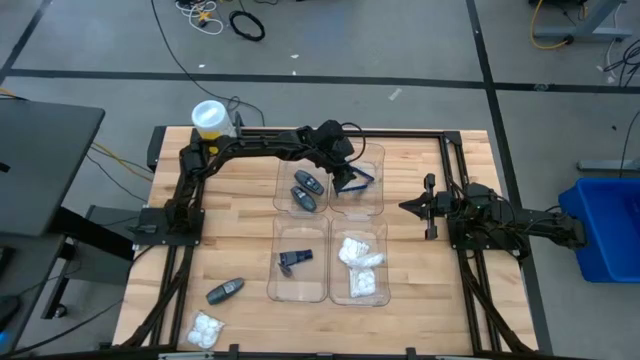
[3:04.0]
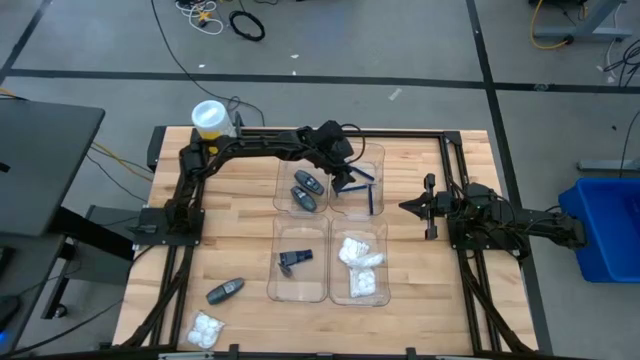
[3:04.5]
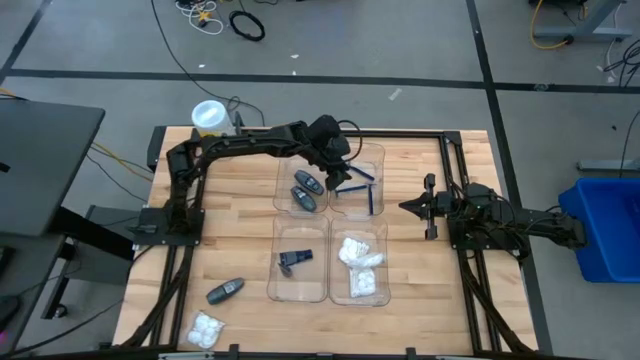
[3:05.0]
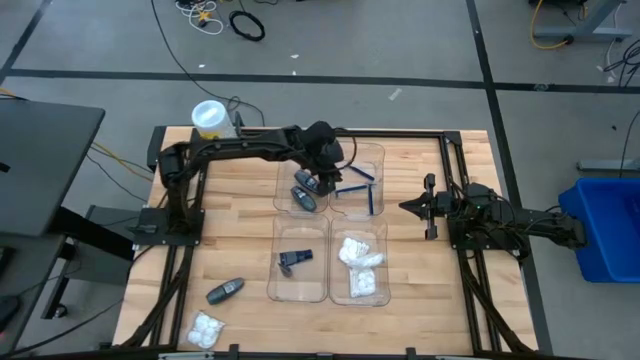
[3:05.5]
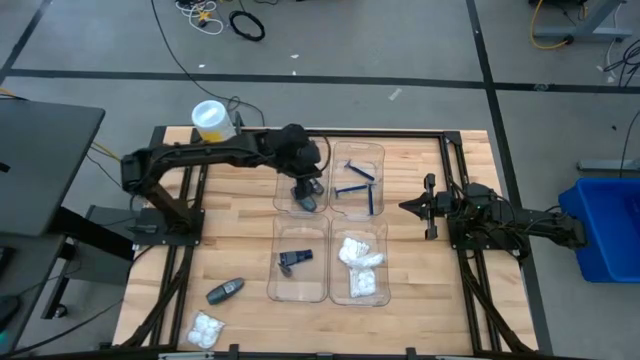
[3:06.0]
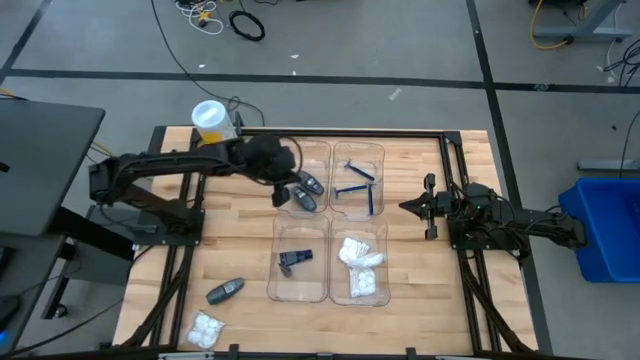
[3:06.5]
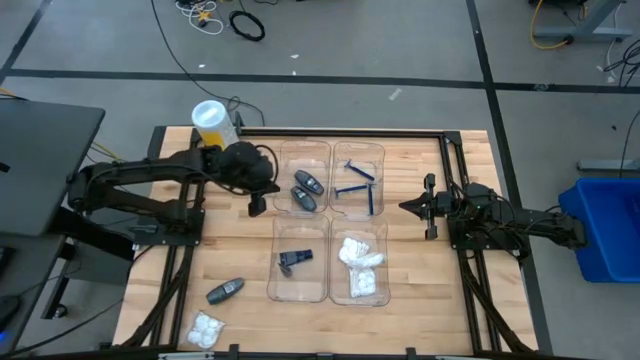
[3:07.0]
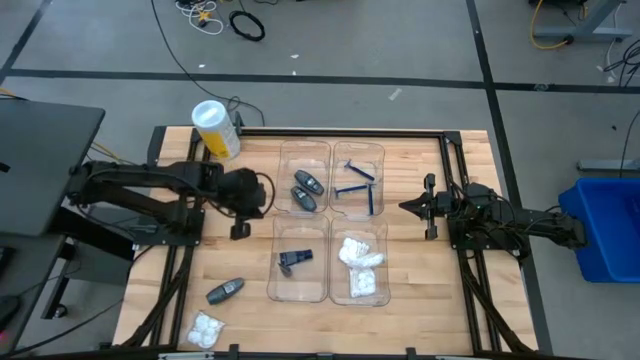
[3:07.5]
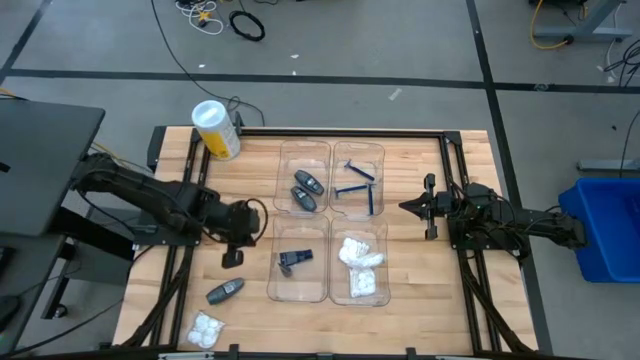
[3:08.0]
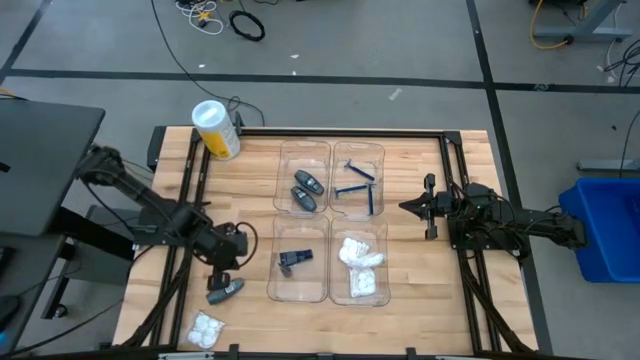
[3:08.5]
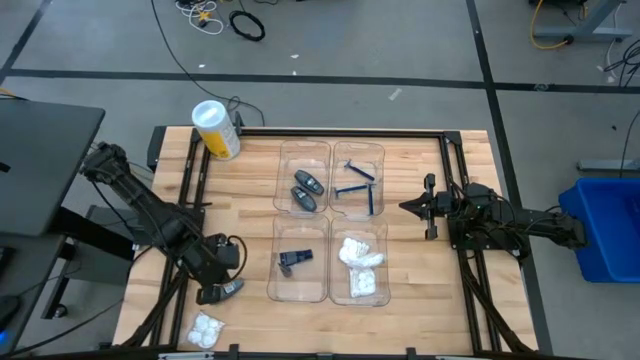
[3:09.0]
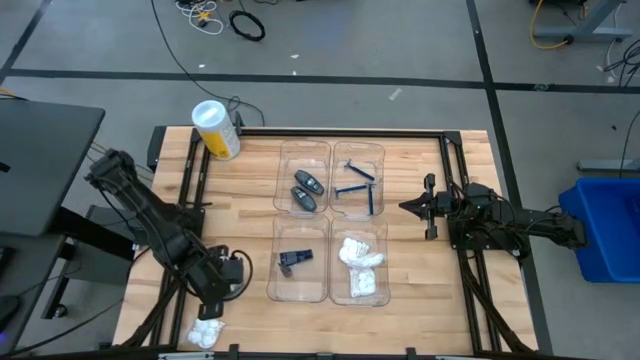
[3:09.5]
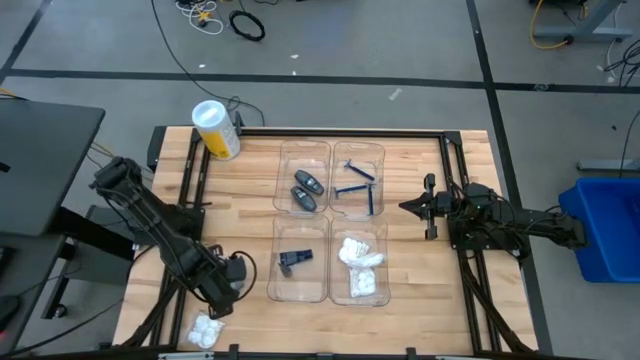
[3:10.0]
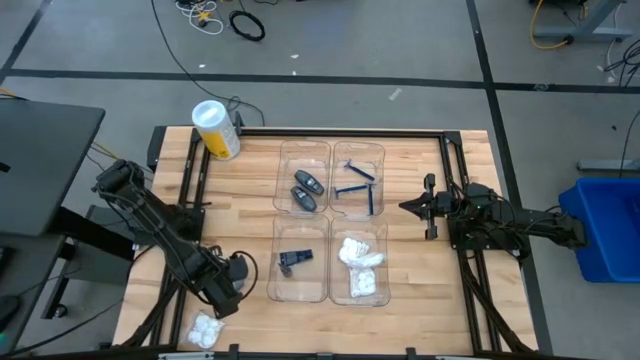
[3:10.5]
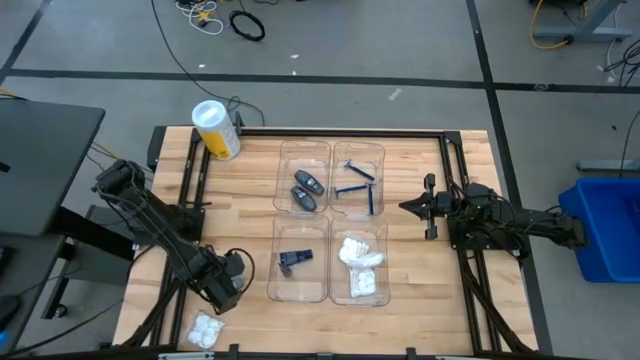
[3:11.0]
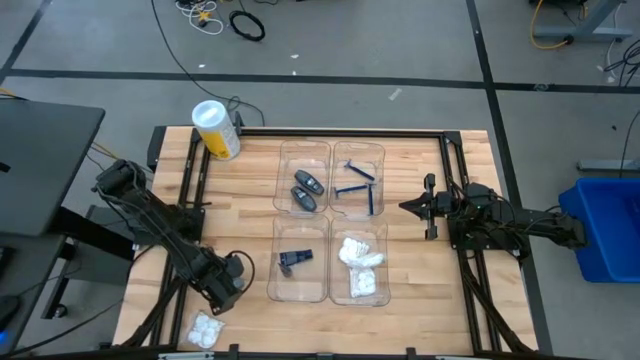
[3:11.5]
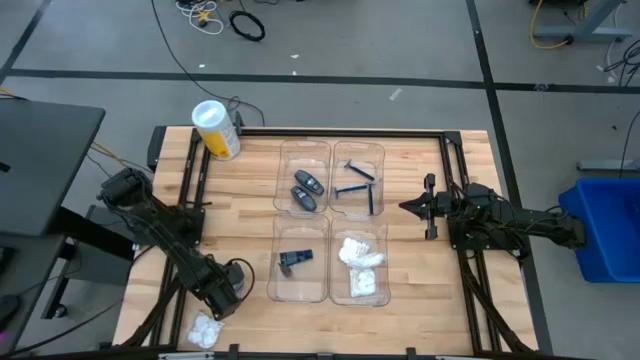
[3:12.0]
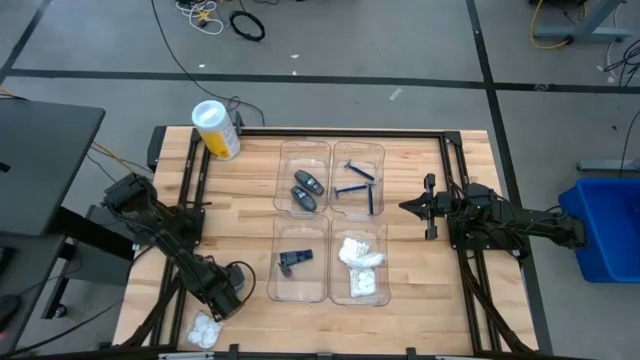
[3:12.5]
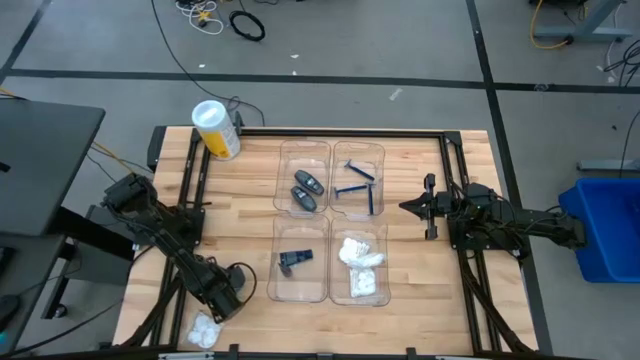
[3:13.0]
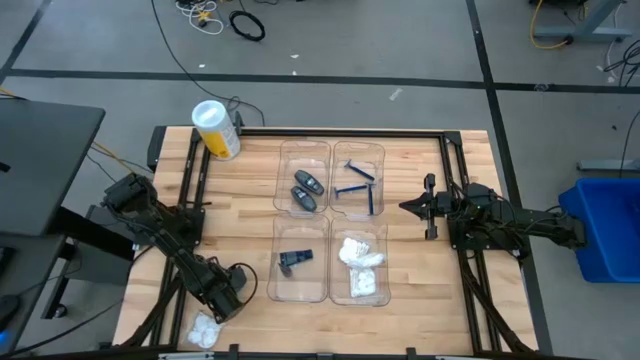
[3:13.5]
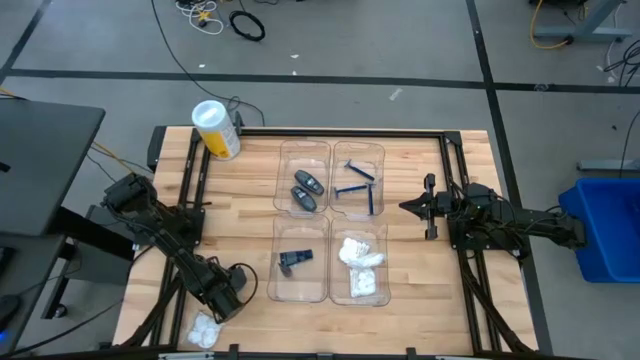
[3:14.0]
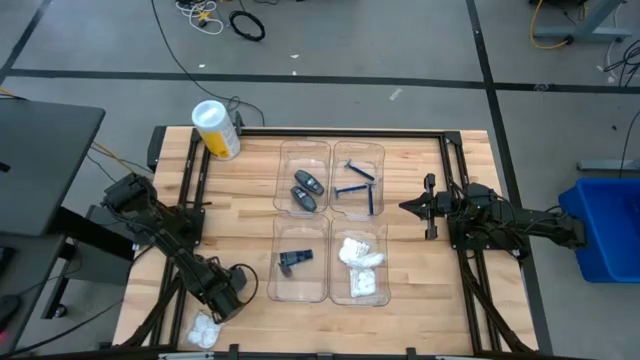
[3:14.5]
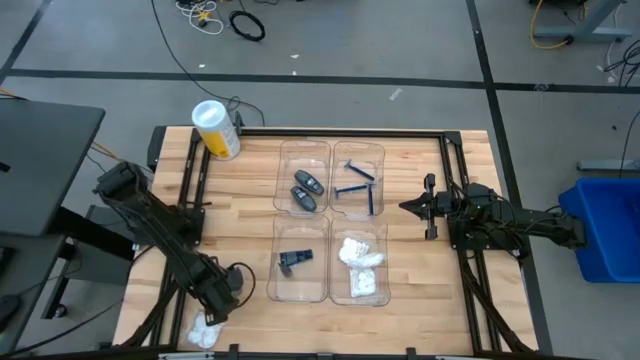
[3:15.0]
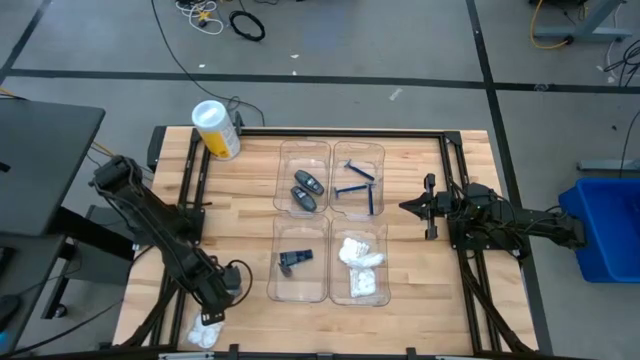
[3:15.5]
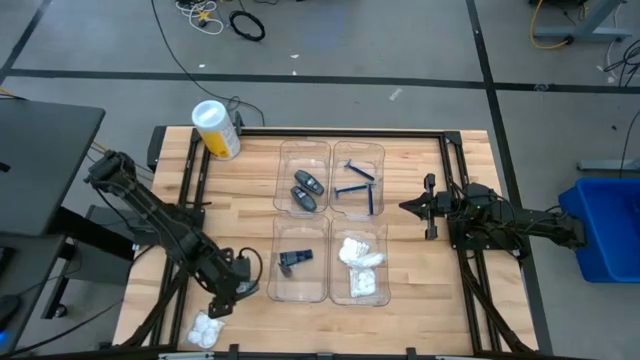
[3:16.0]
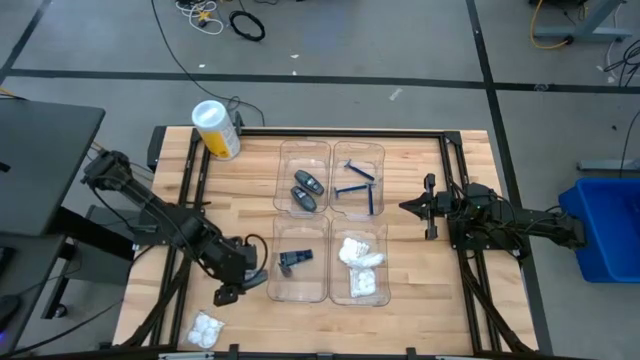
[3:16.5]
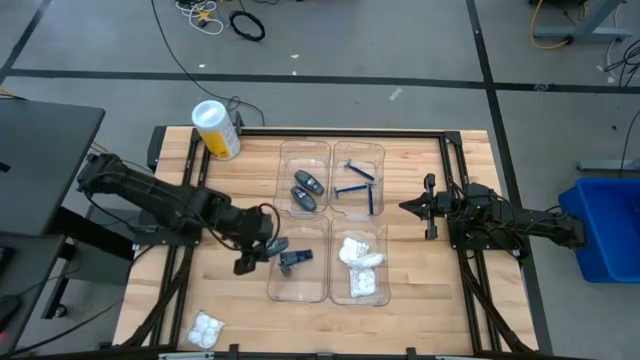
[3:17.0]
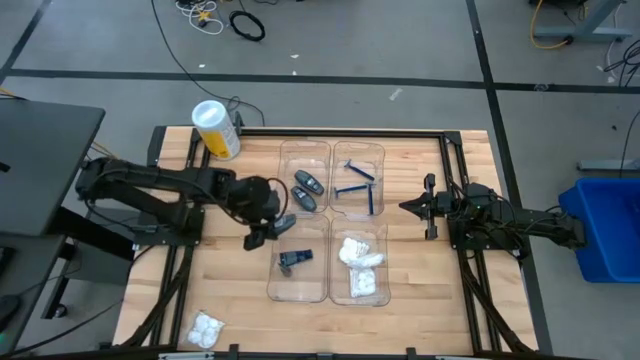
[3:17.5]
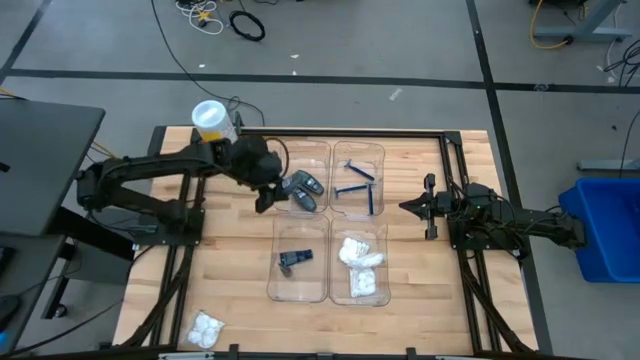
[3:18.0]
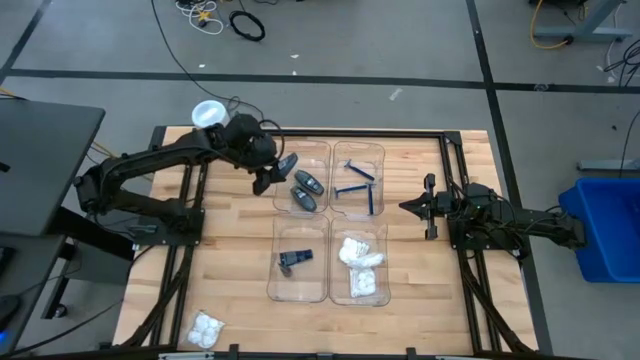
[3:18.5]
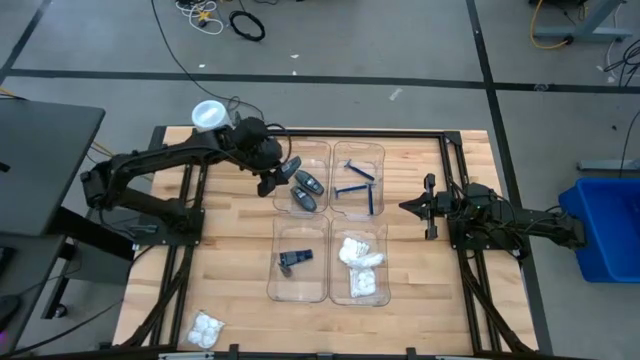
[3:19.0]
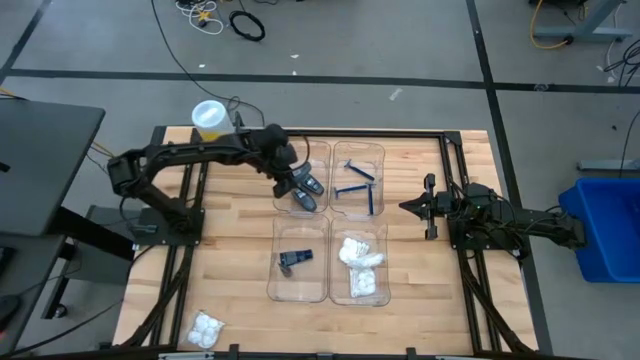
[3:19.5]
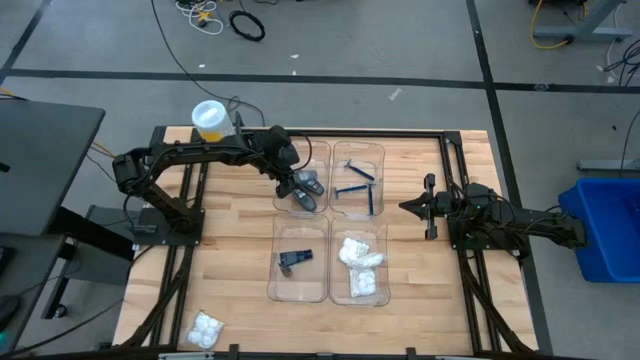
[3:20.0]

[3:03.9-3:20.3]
Task: Pick & Place Travel size toiletries
Put the deodorant into the top left transparent bin

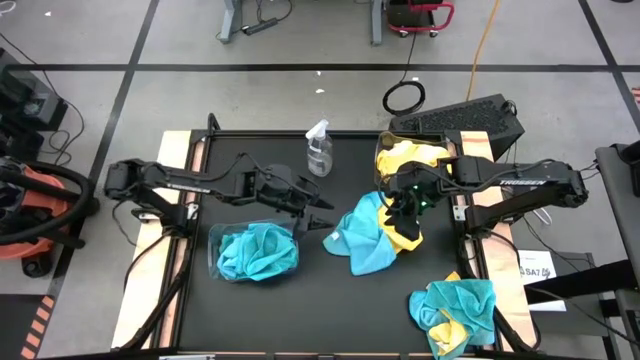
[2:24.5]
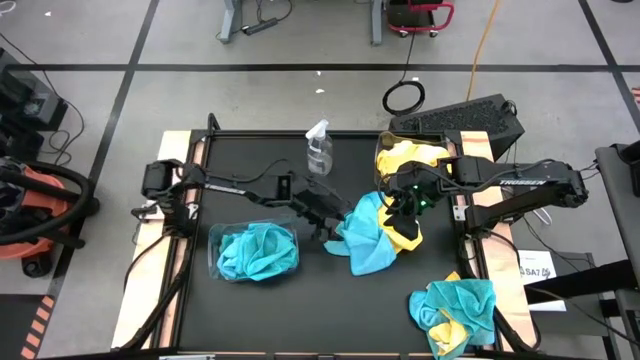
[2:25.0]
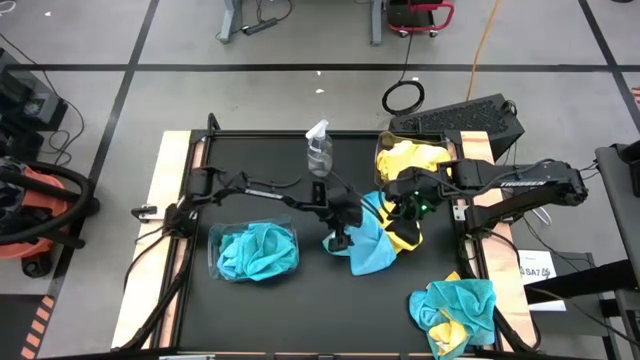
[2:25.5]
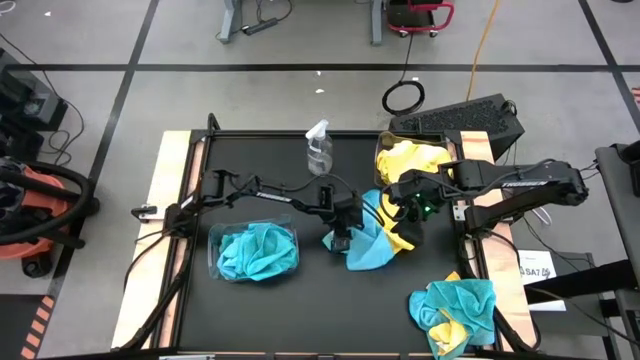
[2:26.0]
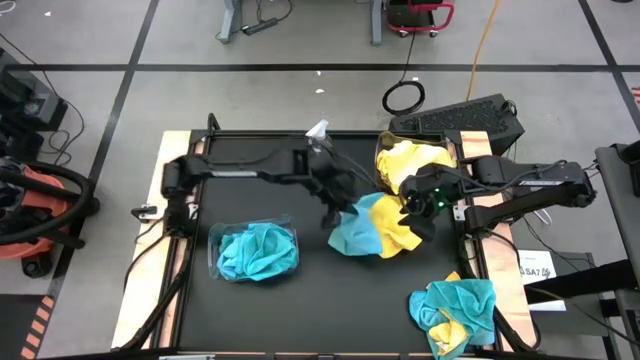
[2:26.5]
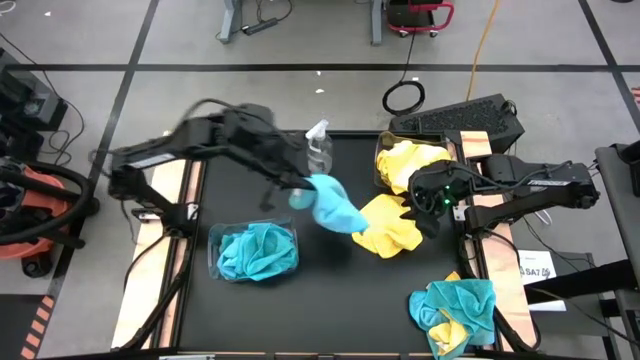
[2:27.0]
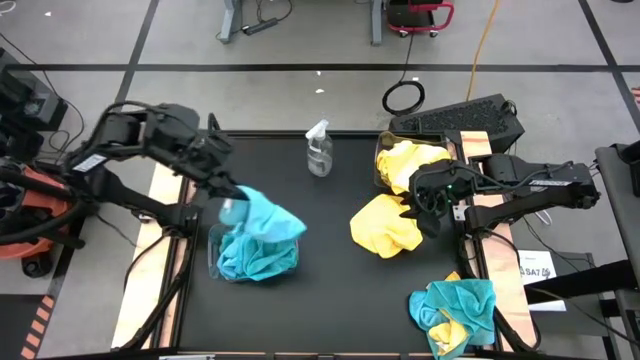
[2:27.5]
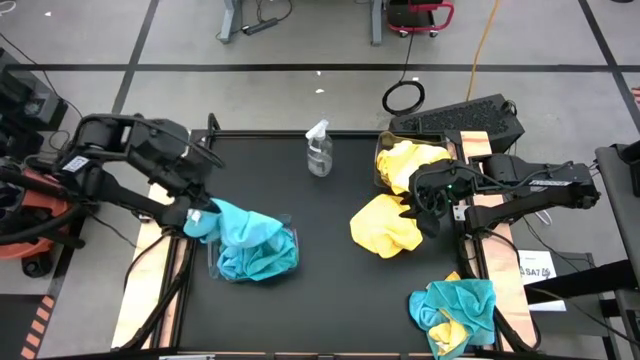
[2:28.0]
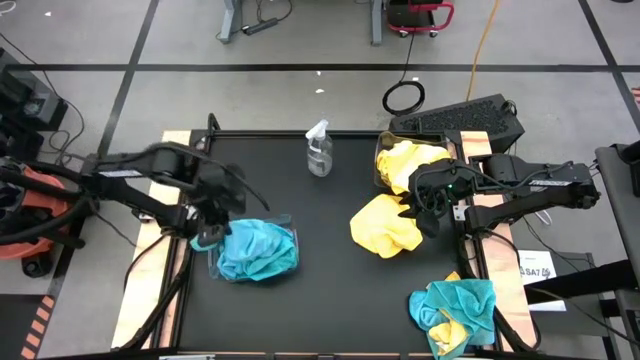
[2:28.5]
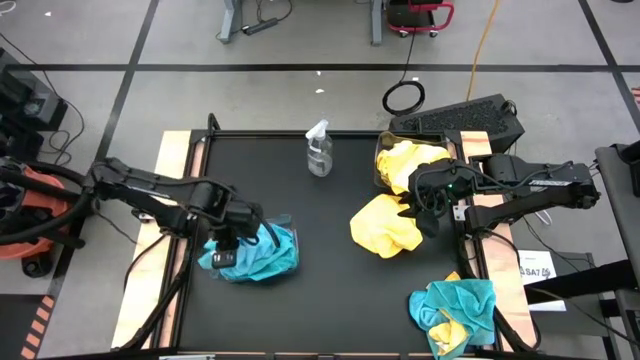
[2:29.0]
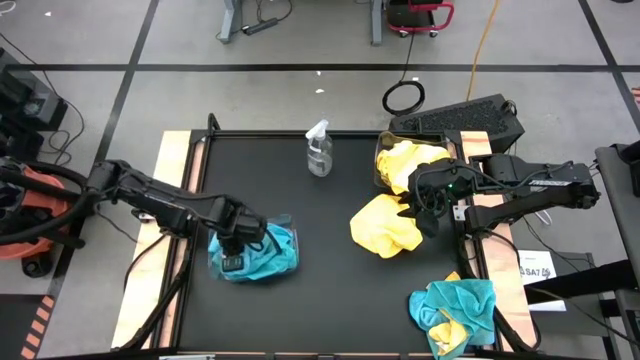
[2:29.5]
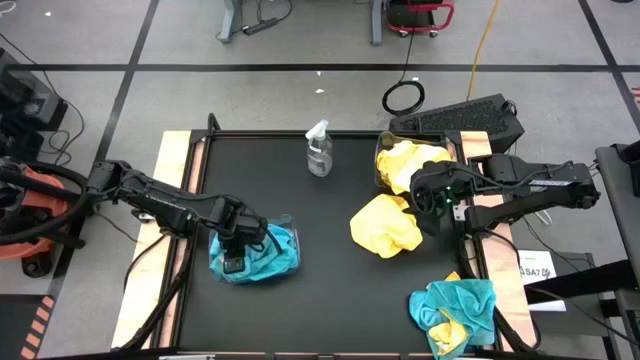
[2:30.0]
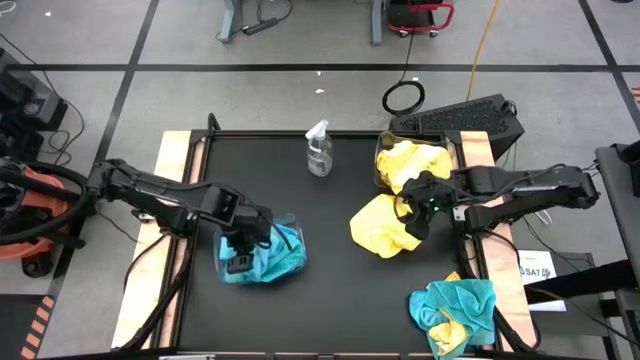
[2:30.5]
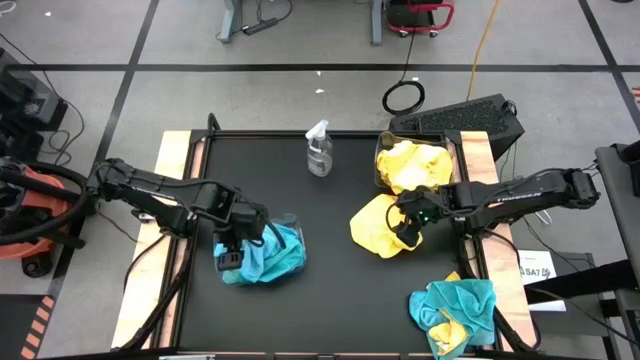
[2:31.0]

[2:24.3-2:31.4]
Task: Sort microfiber towel by color & place in baskets
Put the blue towel into the bottom transparent bin
